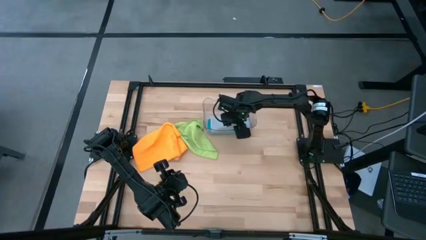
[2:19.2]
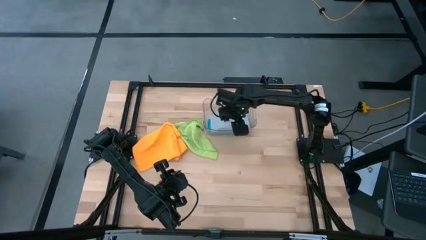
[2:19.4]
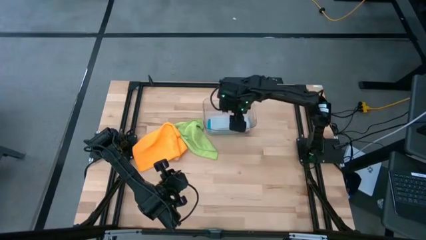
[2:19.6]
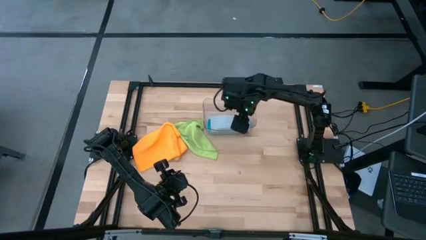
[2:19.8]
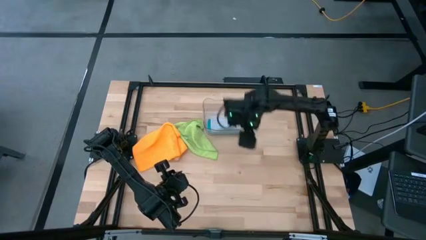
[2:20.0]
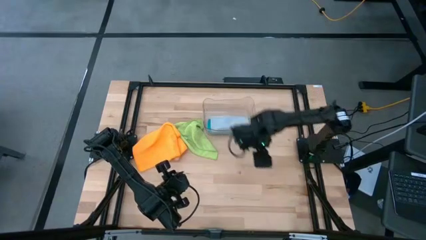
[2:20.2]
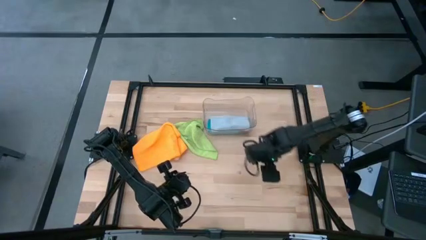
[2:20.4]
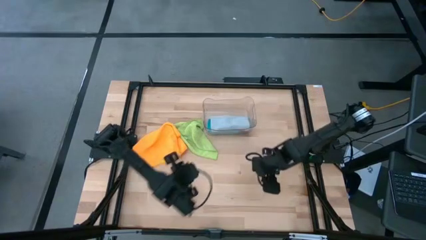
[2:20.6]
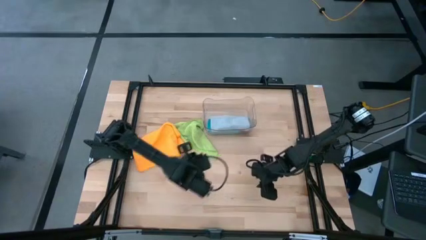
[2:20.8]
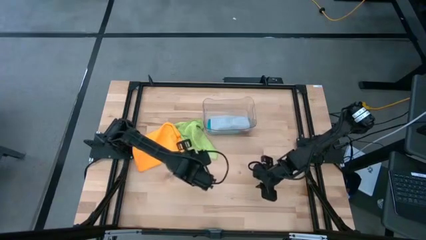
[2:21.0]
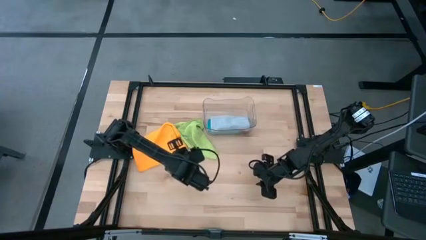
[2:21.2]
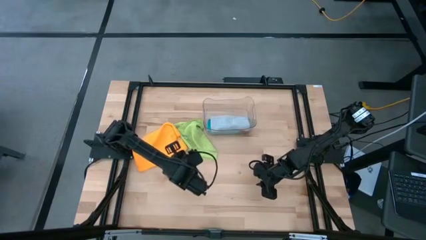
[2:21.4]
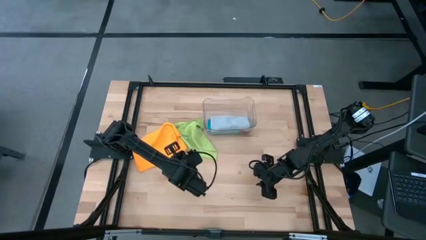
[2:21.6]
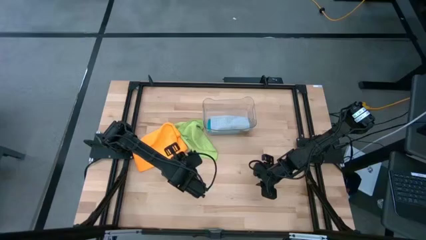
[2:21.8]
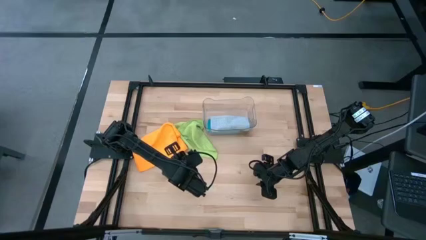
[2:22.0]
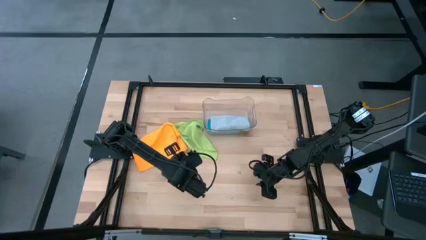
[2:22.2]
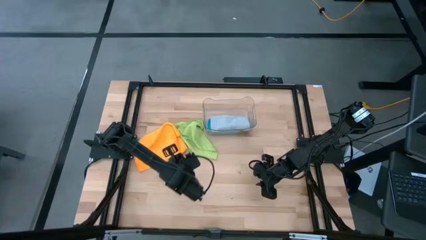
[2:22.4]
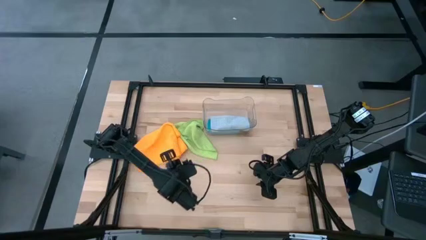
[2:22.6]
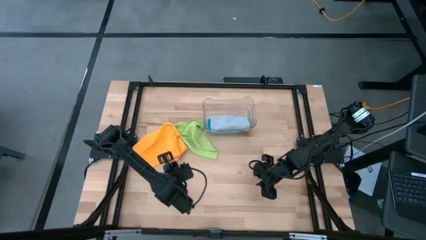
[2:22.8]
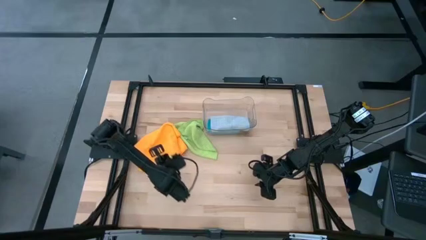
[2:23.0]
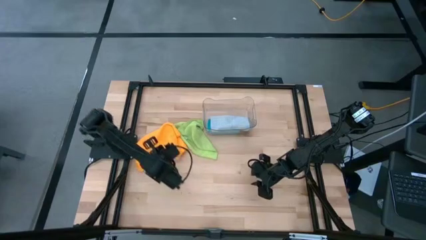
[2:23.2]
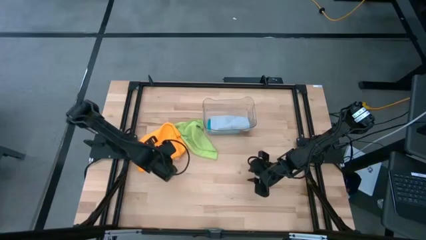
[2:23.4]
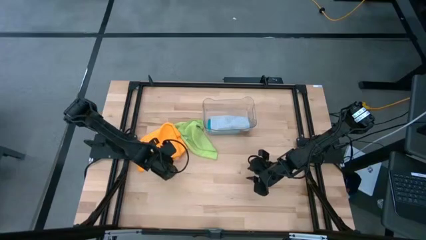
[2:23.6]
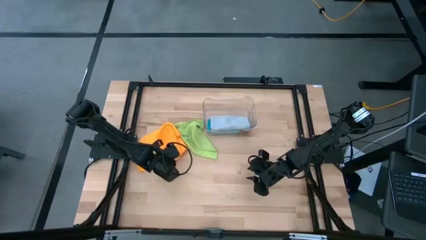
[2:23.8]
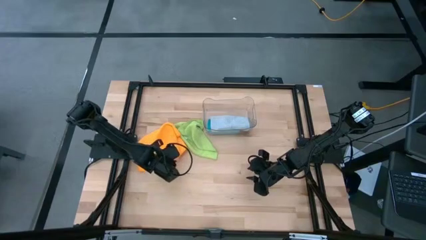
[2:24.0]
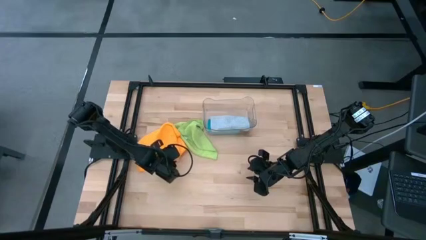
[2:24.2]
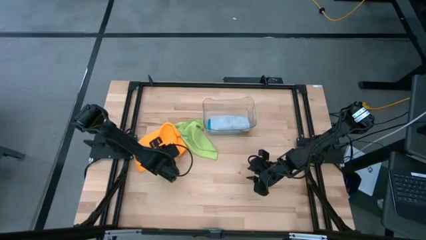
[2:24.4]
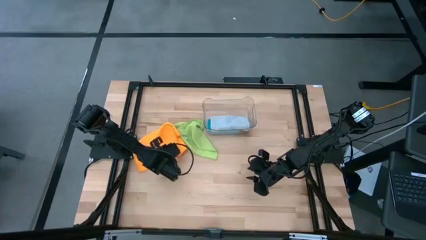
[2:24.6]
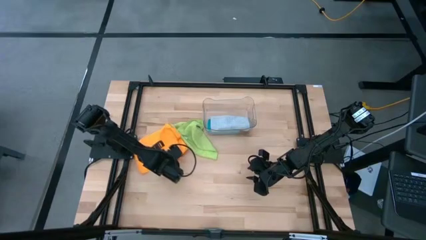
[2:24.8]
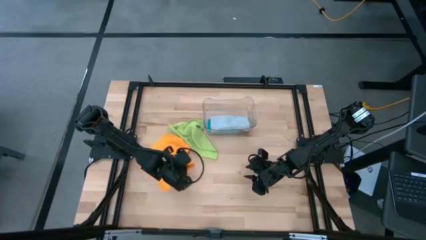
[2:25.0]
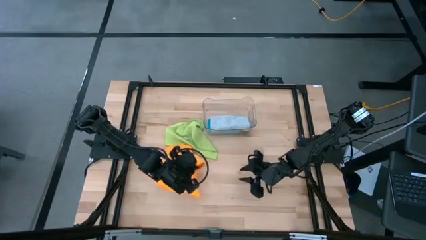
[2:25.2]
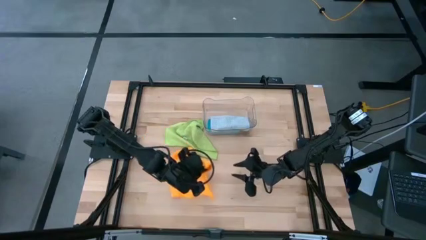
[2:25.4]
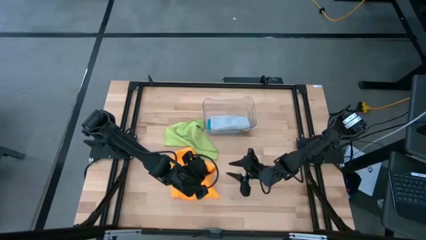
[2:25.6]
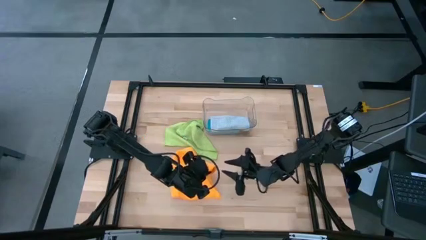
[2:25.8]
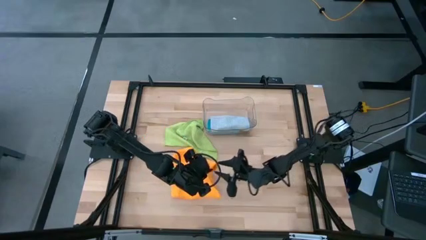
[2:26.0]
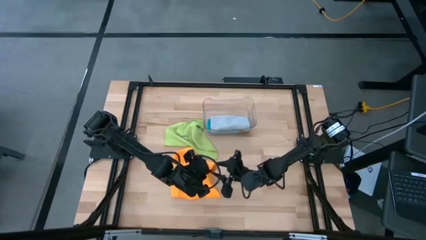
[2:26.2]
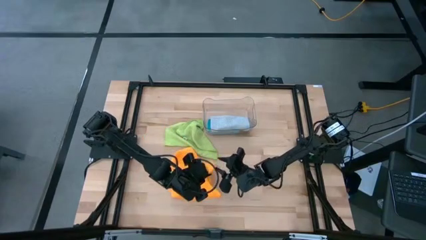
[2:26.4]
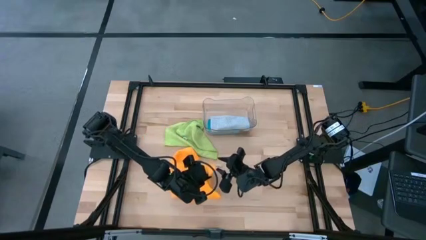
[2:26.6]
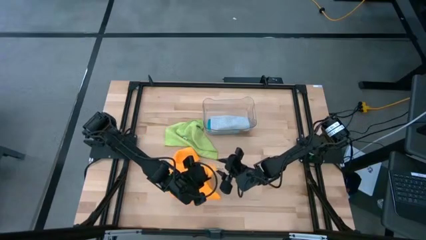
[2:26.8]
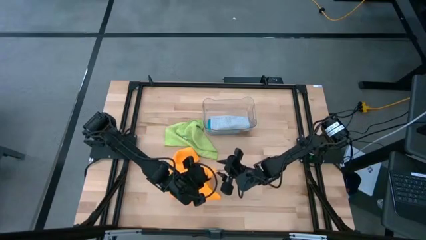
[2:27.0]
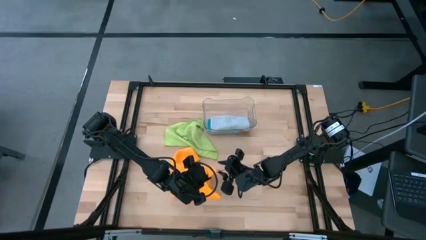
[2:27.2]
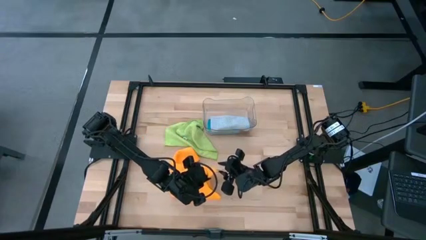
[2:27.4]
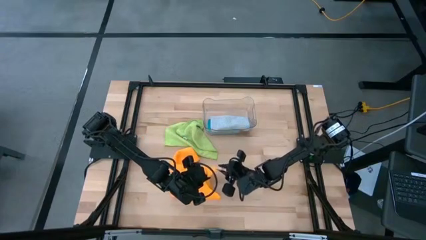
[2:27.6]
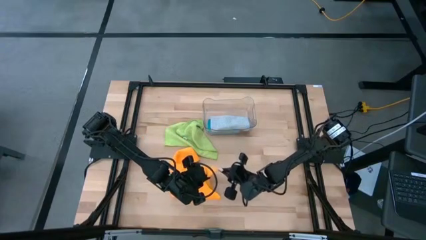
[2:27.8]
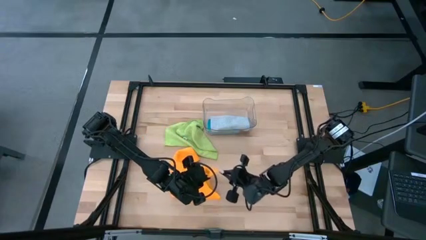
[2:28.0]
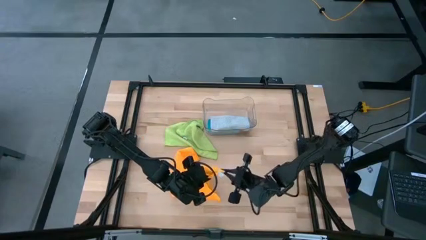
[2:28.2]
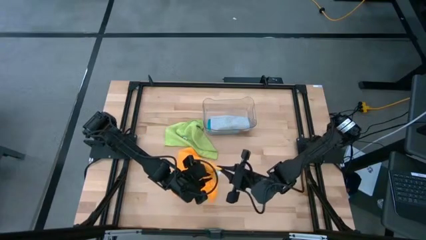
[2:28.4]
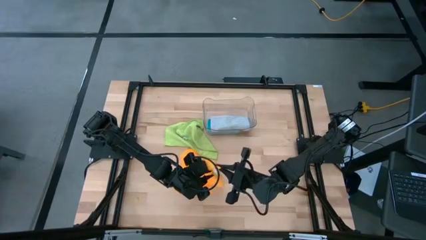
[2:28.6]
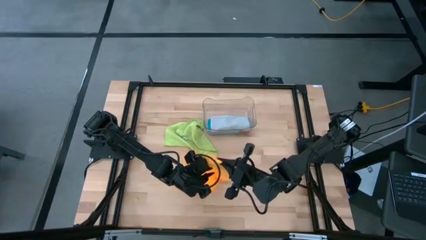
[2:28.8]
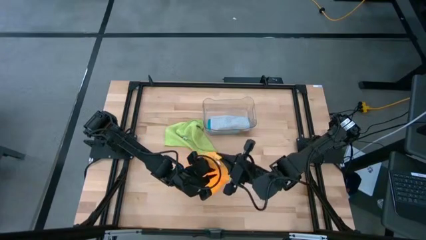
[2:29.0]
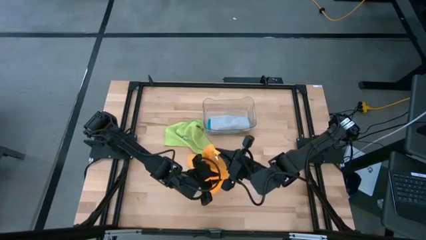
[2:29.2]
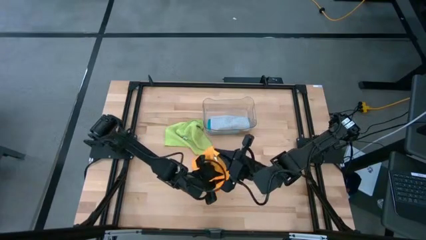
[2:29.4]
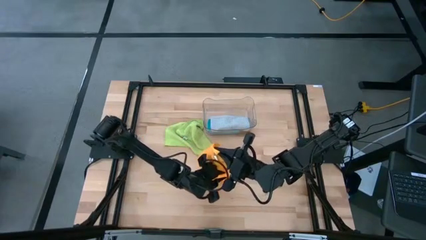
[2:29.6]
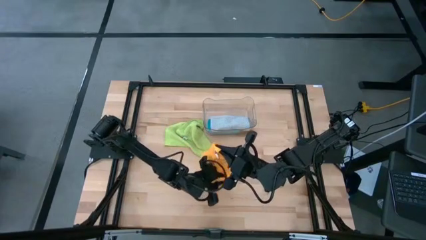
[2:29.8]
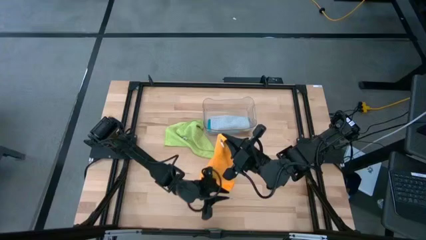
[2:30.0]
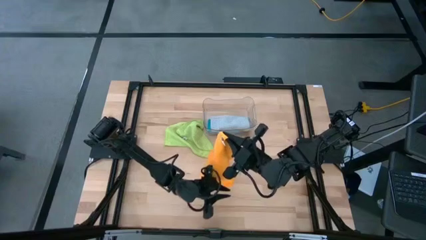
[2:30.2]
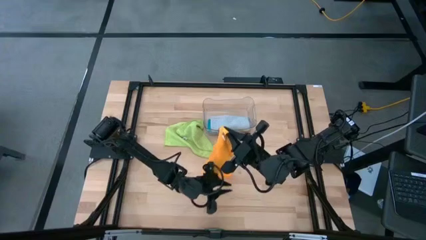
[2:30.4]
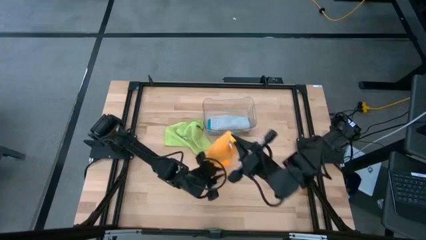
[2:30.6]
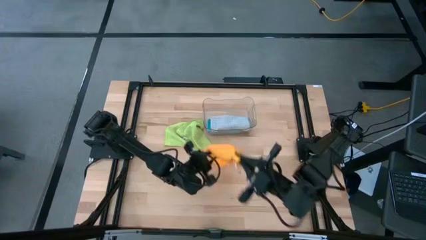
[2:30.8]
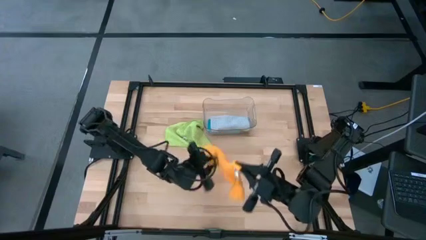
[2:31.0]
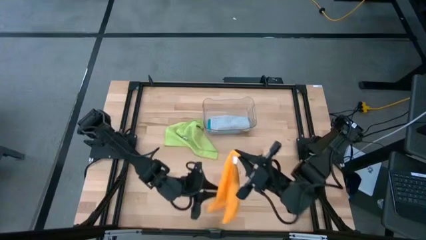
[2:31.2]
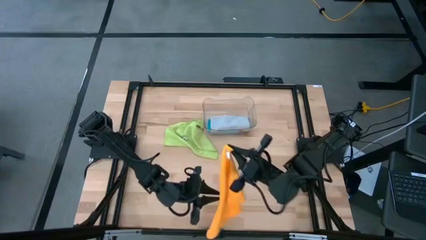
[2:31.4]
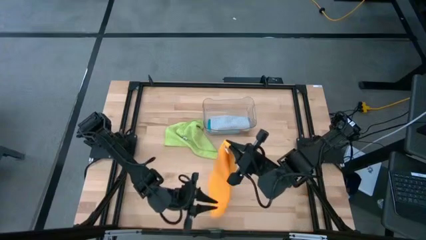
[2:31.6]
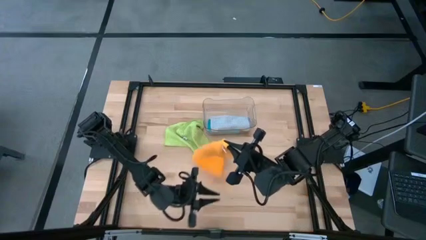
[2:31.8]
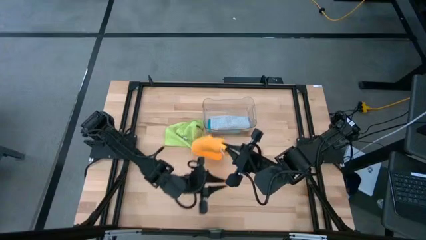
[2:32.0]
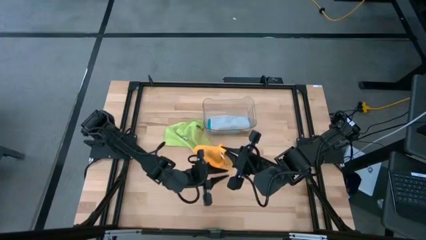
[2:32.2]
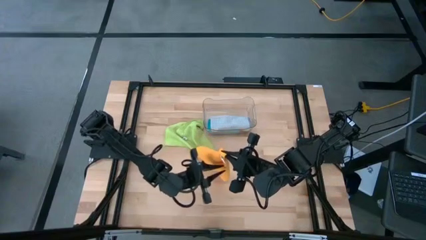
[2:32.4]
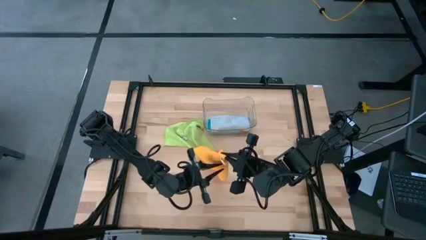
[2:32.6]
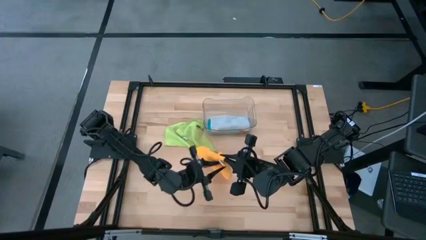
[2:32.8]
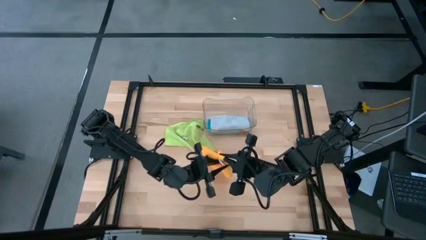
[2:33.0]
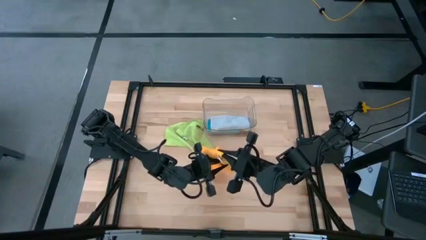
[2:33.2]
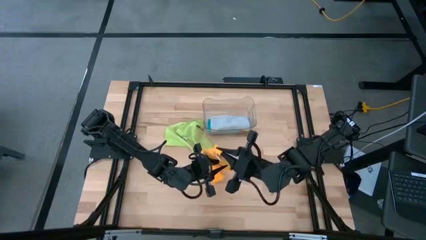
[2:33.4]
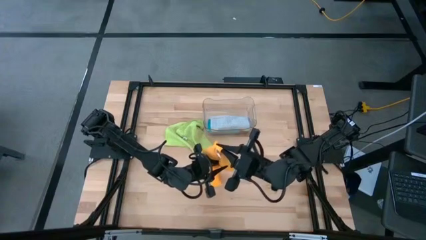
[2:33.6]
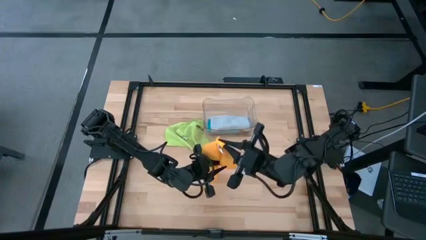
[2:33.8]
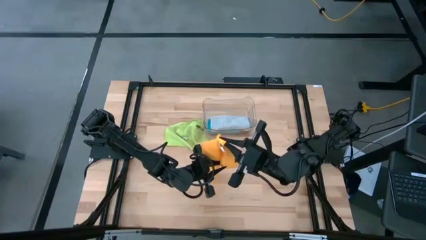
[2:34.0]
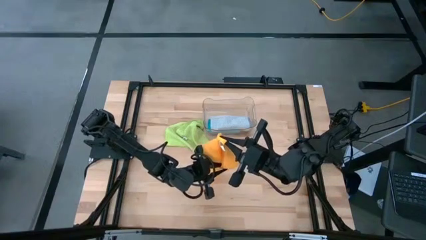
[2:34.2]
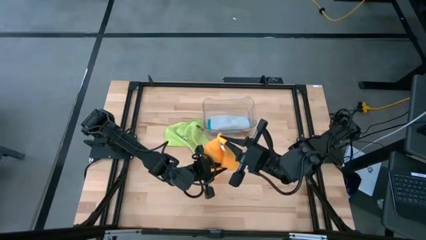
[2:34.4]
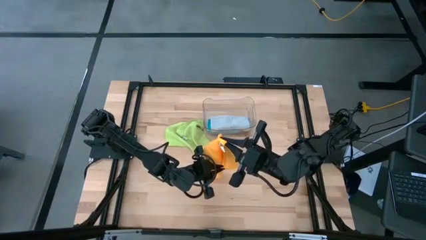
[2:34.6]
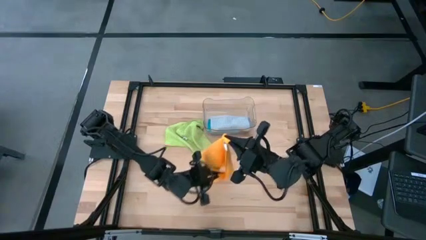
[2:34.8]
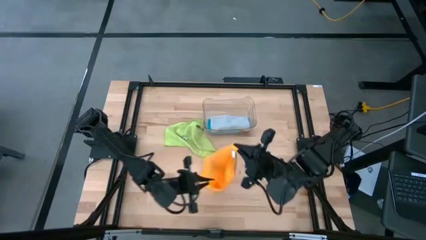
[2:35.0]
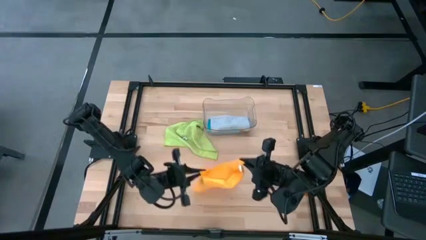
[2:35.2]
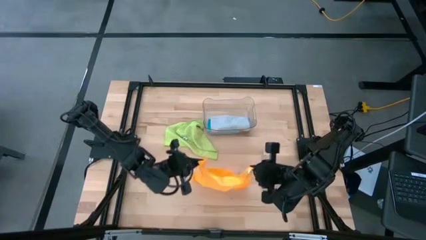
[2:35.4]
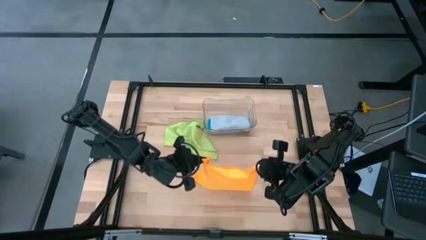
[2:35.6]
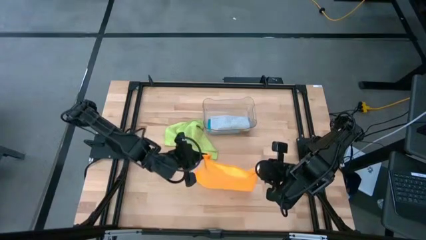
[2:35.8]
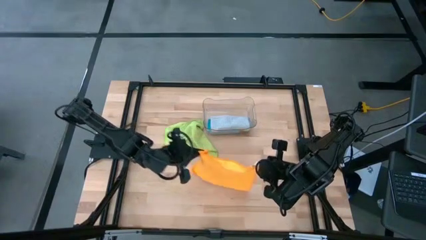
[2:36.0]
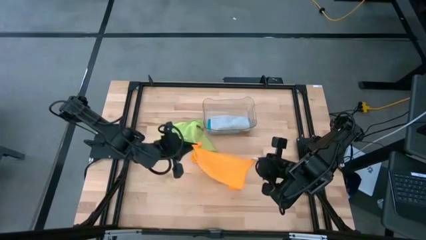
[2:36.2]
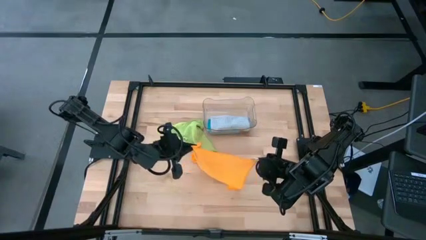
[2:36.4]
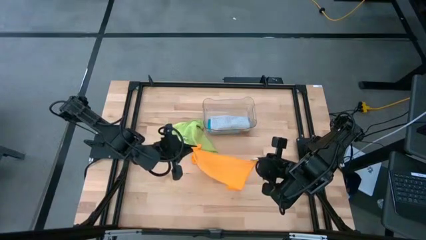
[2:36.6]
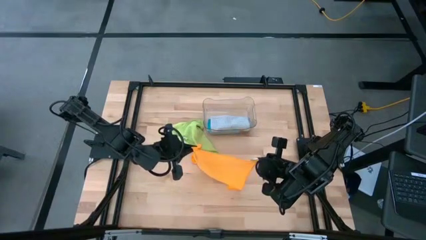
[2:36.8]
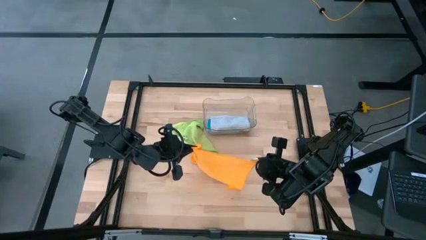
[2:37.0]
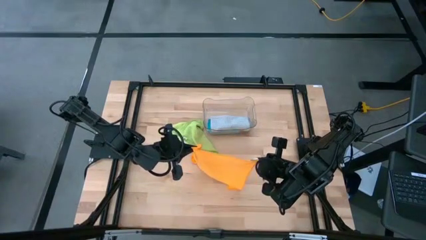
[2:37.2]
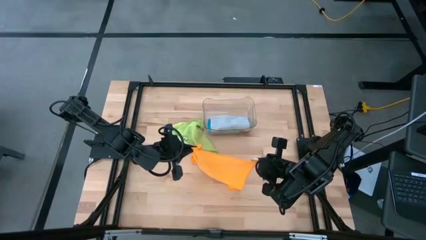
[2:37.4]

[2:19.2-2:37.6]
Task: Fold microfiber towels
Fold the yellow towel
